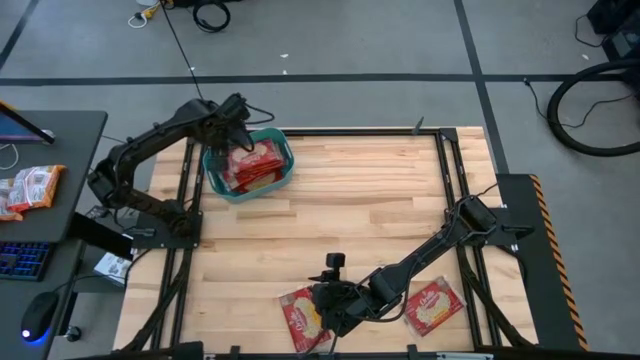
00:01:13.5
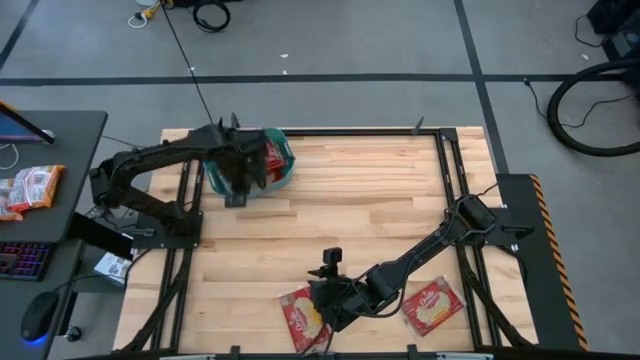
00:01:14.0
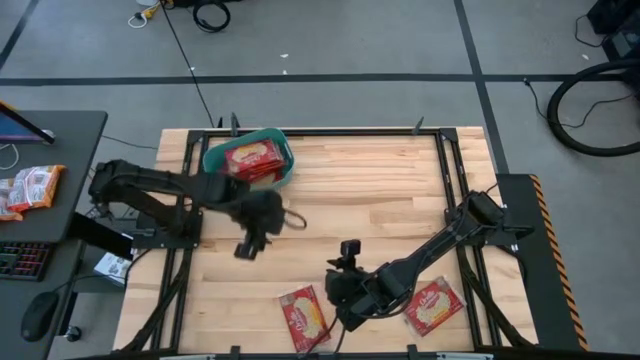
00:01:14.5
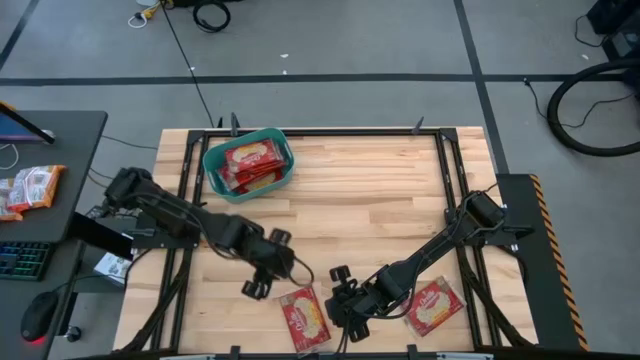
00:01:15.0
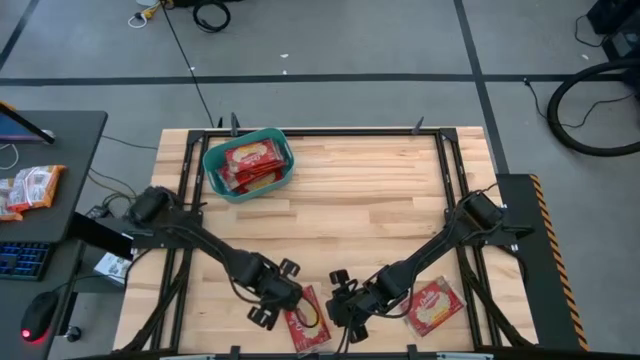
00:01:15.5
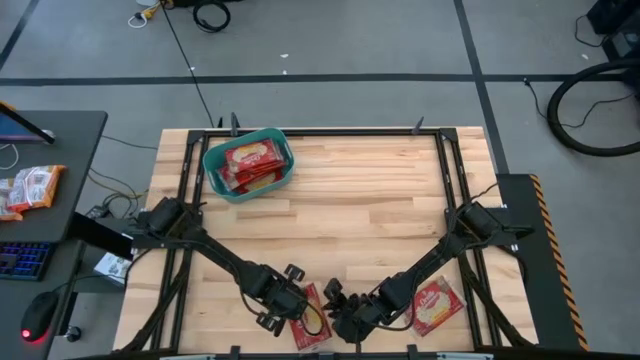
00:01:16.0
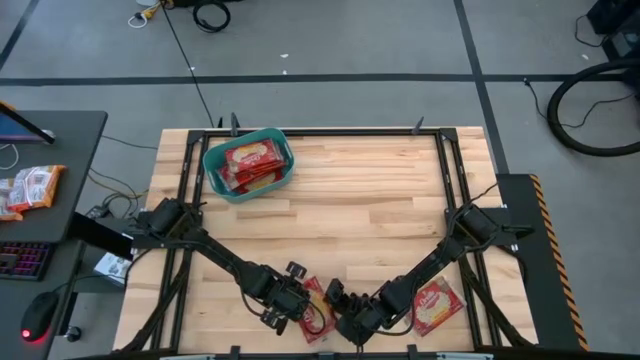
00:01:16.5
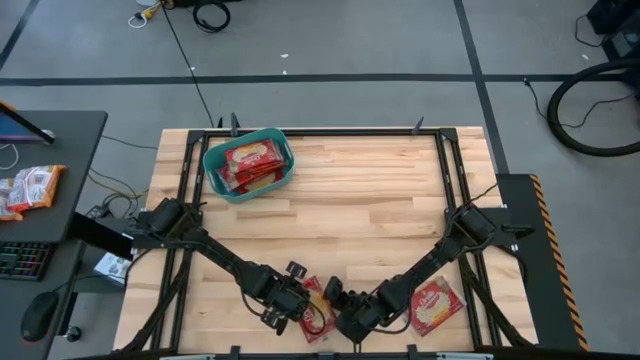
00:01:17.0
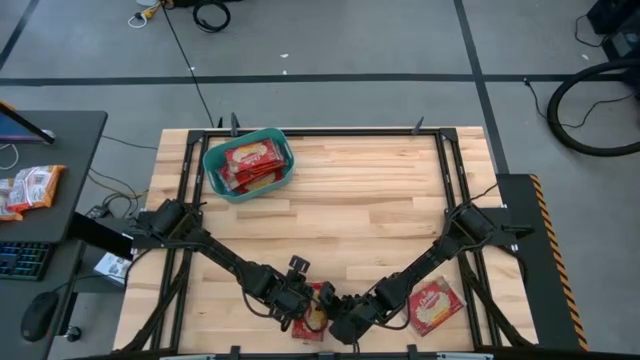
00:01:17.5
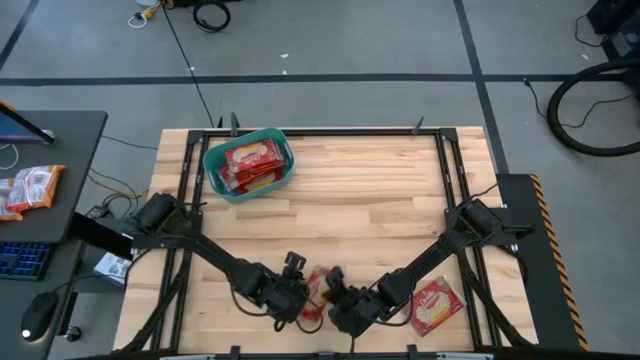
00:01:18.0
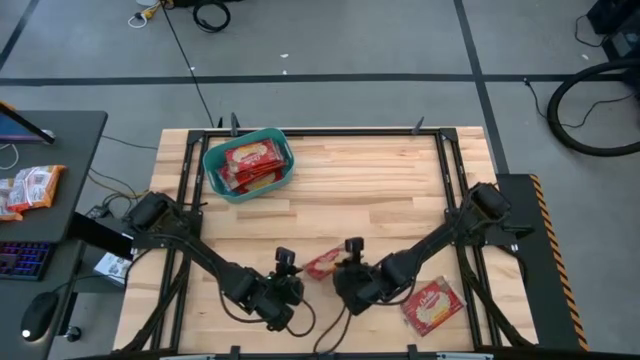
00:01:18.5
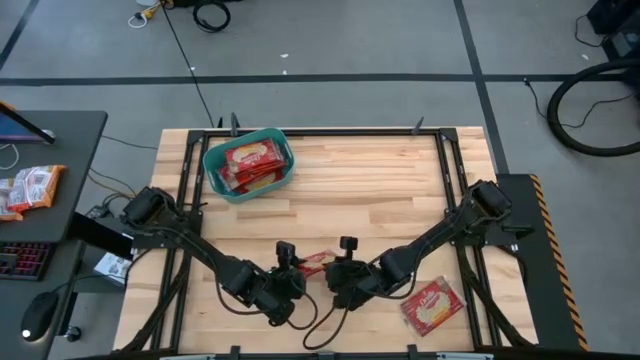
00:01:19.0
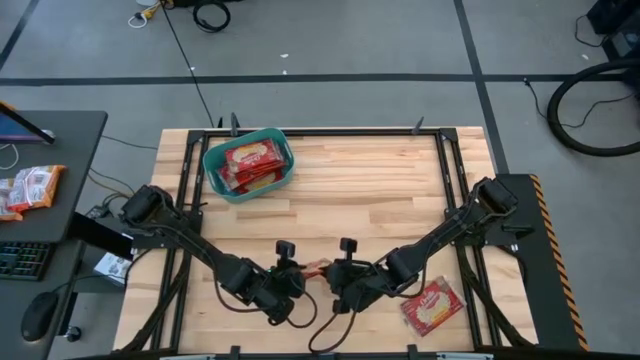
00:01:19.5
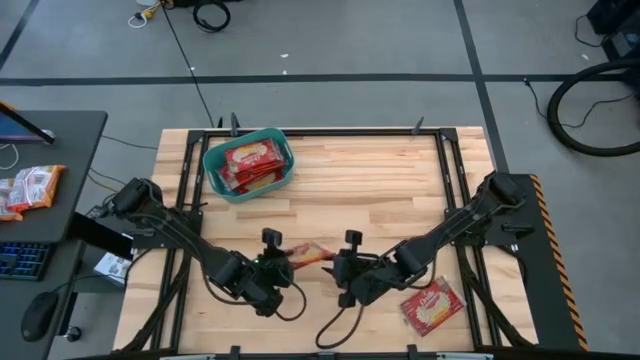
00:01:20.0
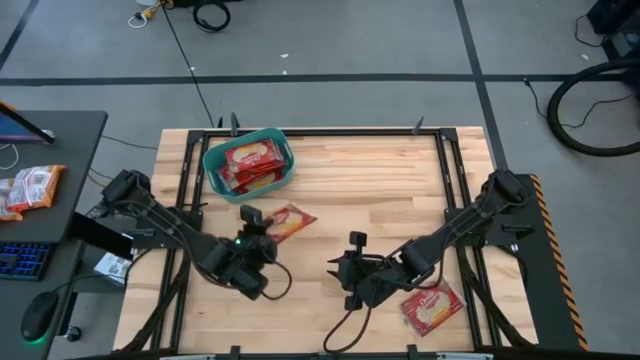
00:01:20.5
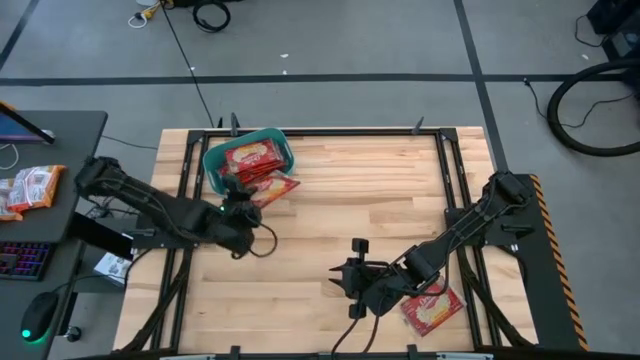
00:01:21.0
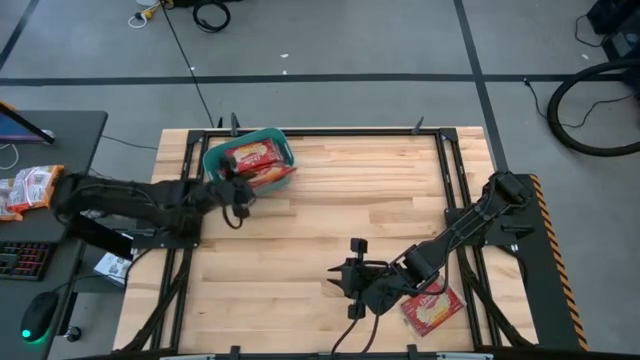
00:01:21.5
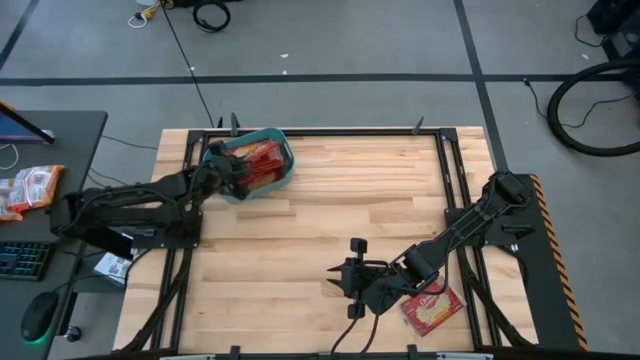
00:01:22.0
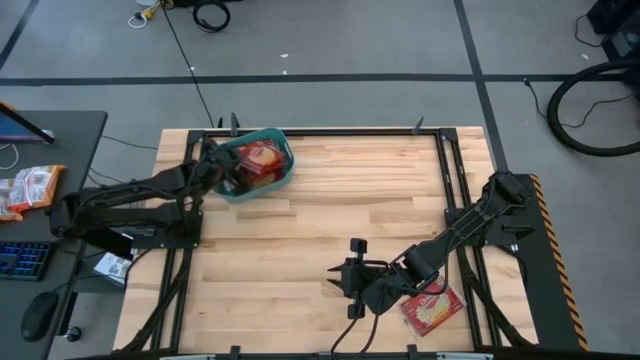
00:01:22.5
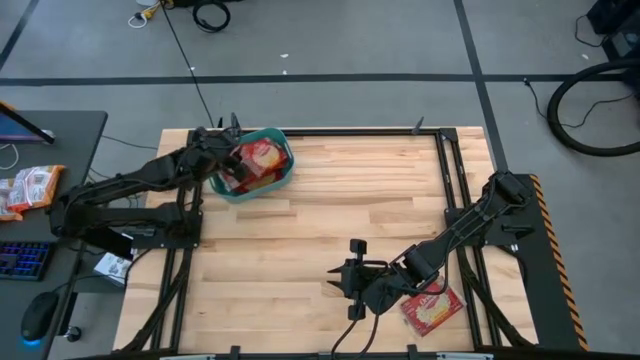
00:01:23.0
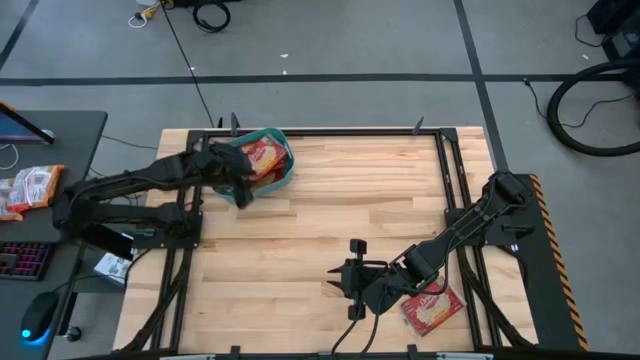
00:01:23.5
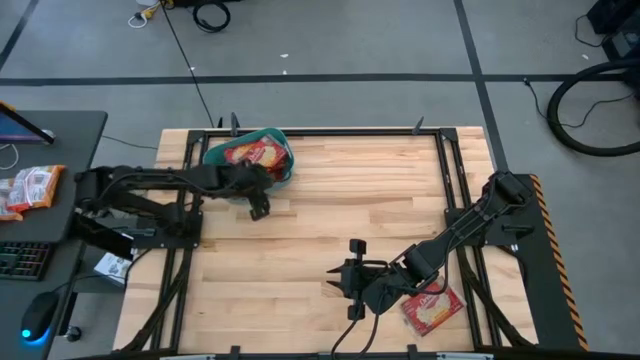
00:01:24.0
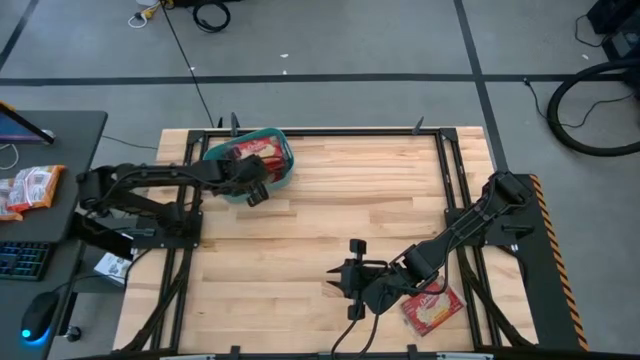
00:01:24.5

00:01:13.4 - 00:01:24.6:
Task: Sort popcorn bags into baskets
Put the left popcorn bag into the bin

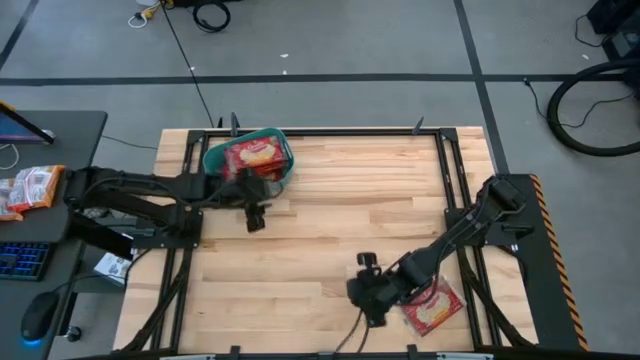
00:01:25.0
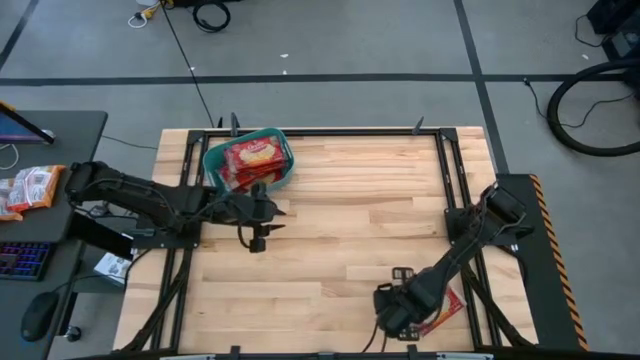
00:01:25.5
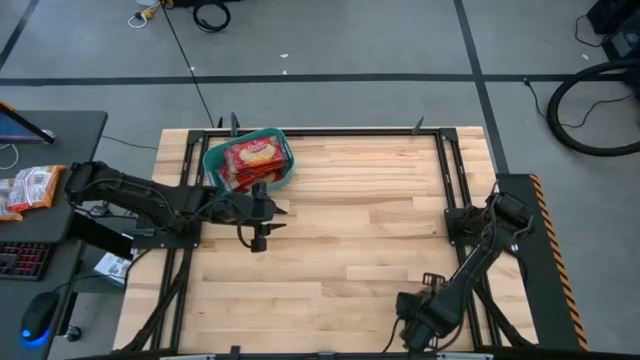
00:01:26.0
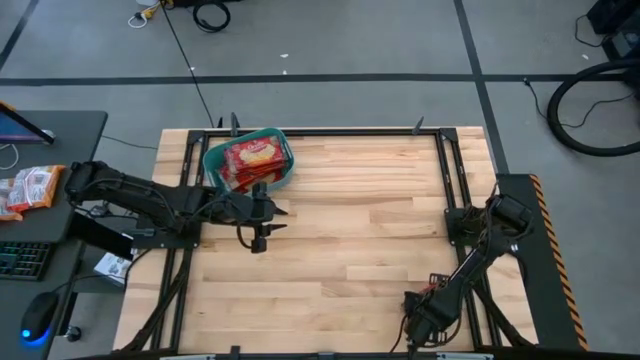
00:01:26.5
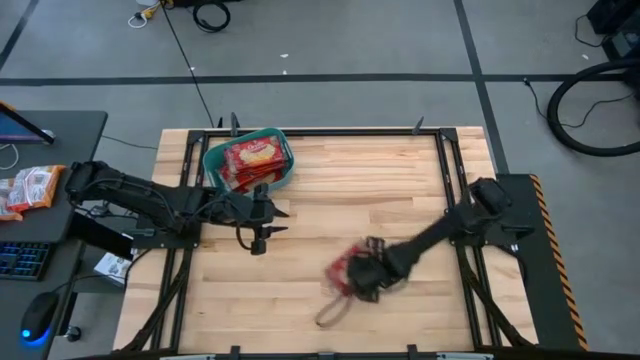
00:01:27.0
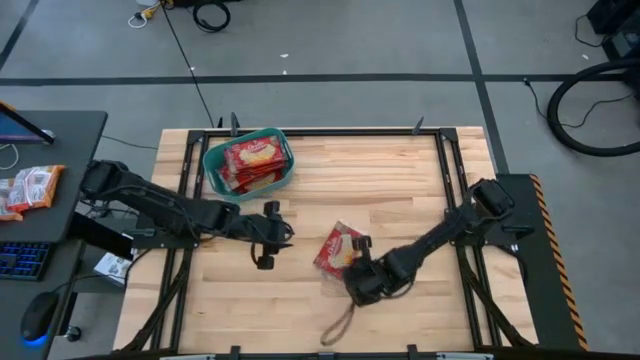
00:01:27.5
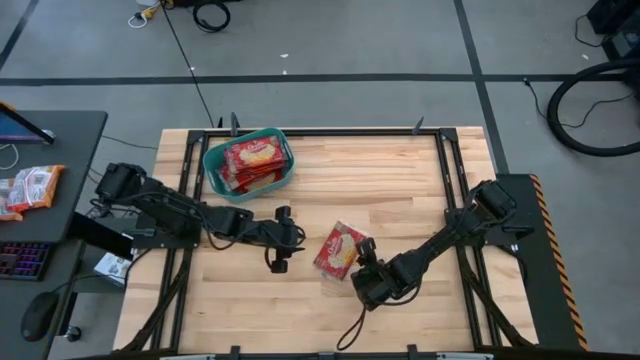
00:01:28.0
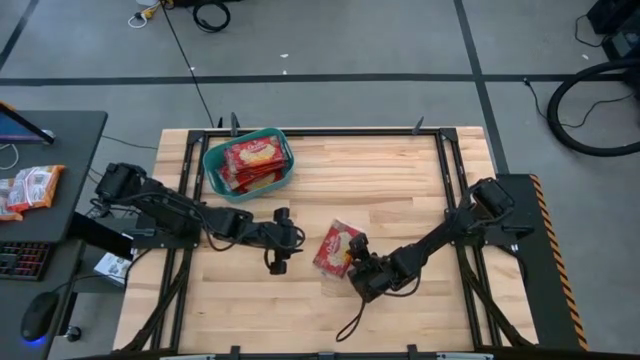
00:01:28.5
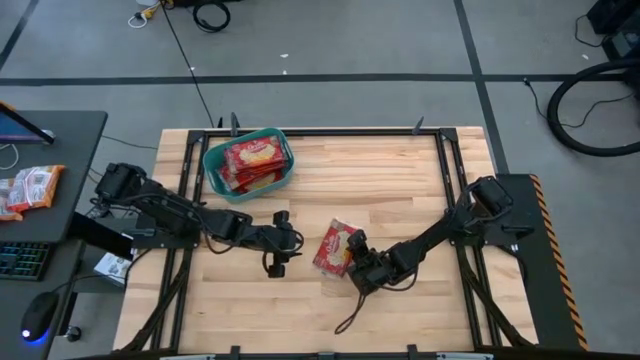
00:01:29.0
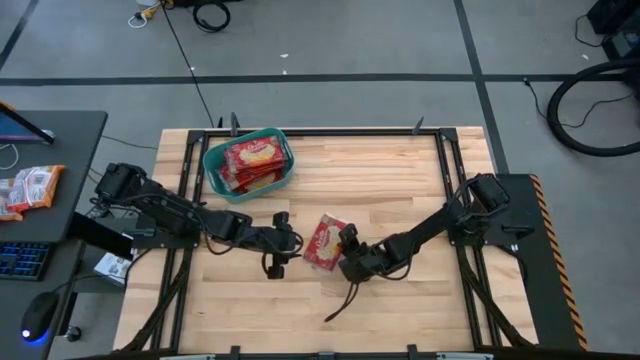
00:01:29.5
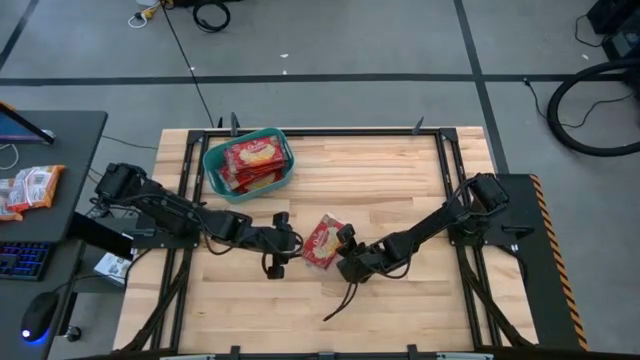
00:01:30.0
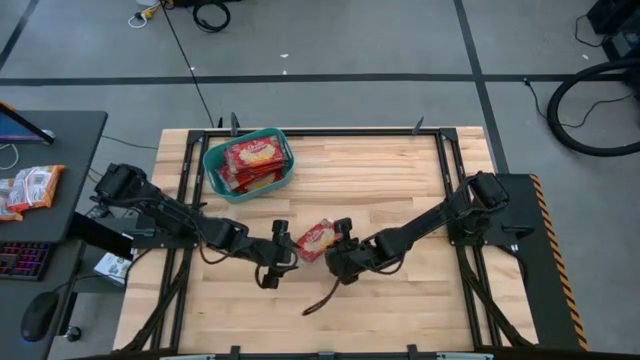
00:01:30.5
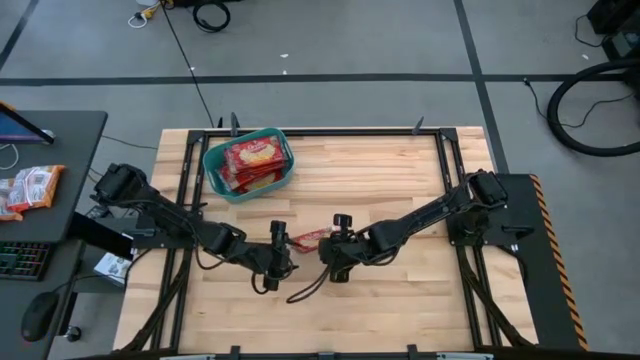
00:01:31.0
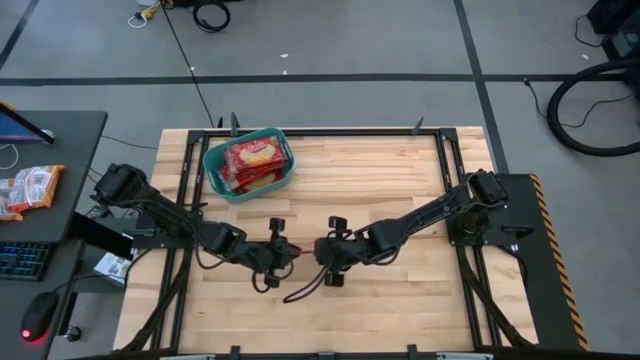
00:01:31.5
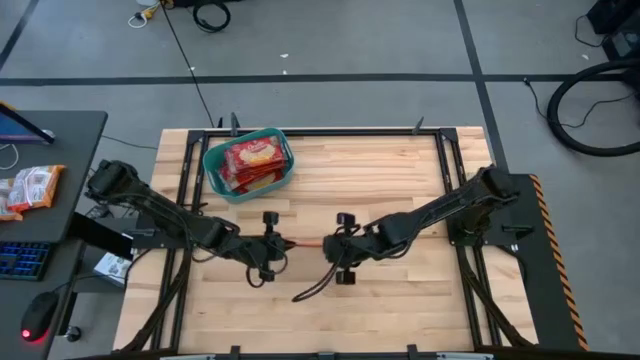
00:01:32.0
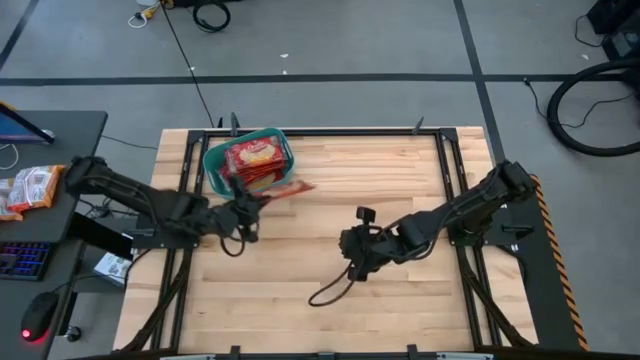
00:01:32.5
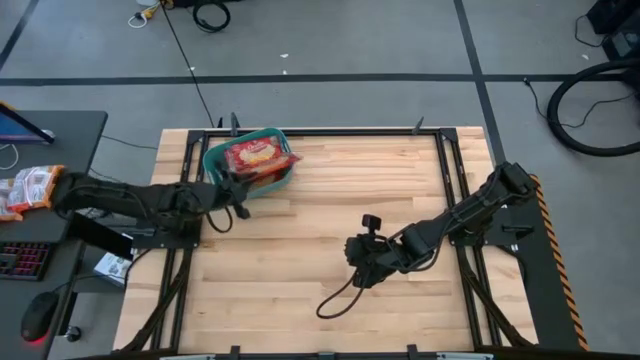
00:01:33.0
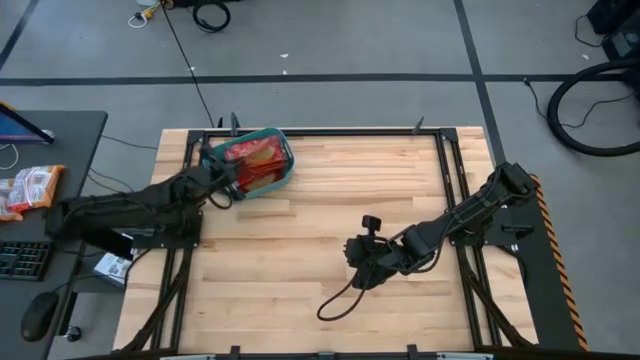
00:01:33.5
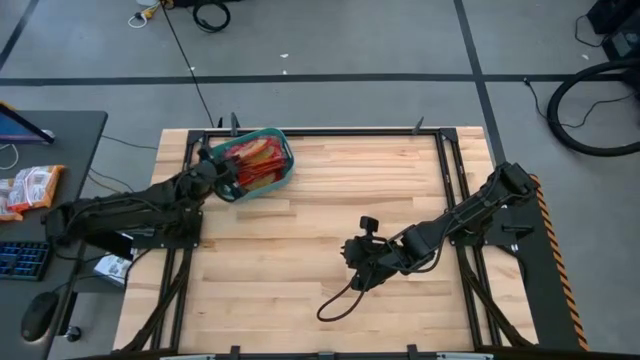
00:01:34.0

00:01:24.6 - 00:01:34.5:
Put the popcorn bag into the bin
